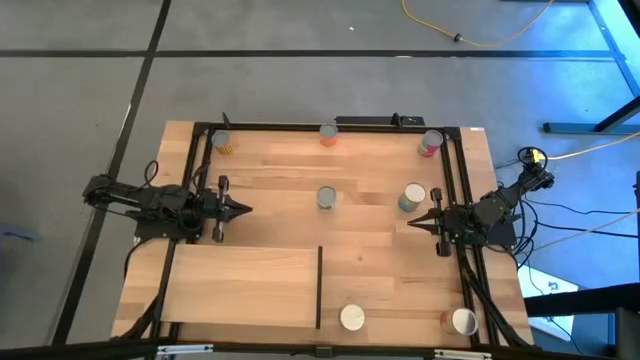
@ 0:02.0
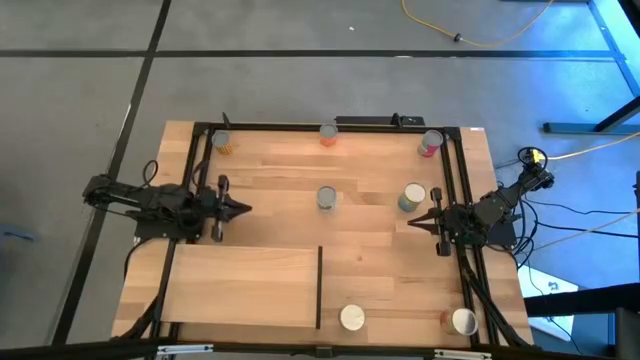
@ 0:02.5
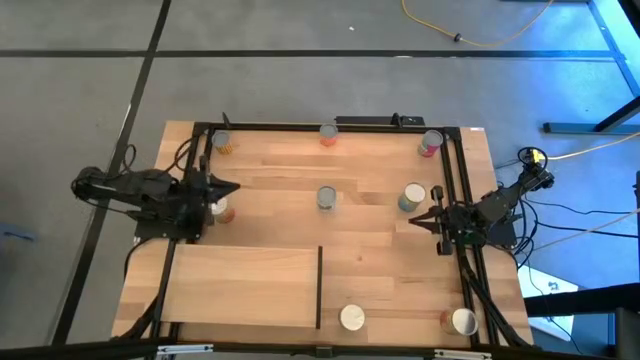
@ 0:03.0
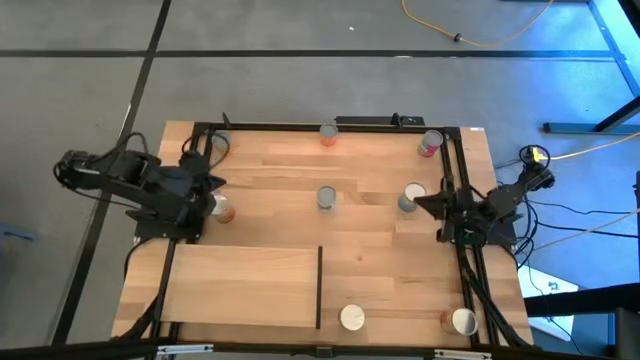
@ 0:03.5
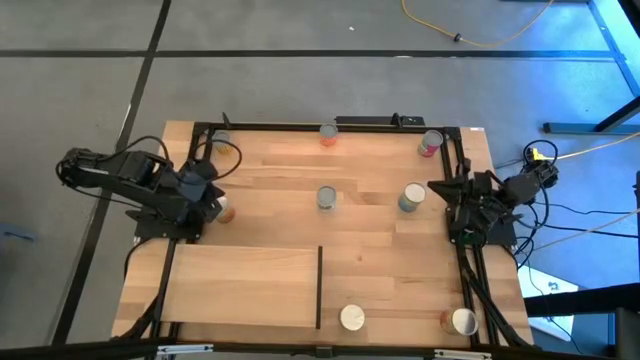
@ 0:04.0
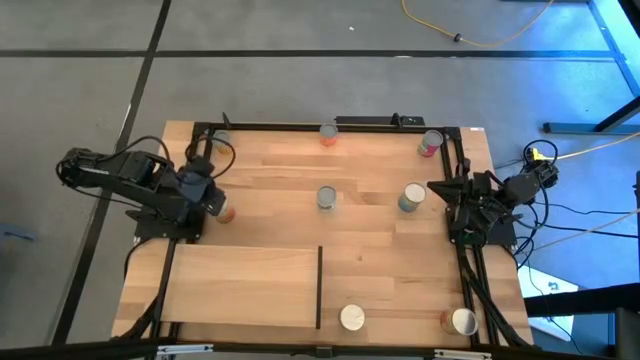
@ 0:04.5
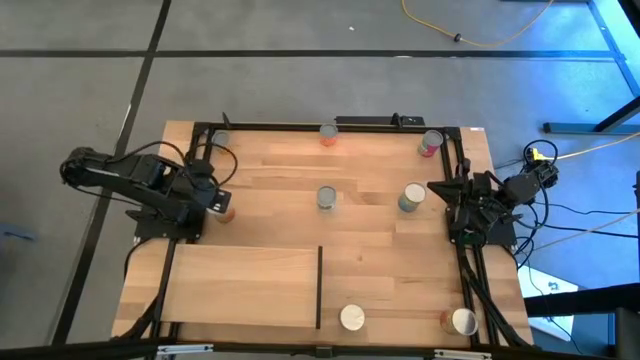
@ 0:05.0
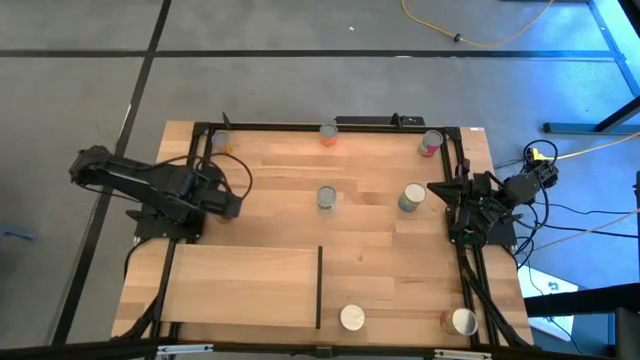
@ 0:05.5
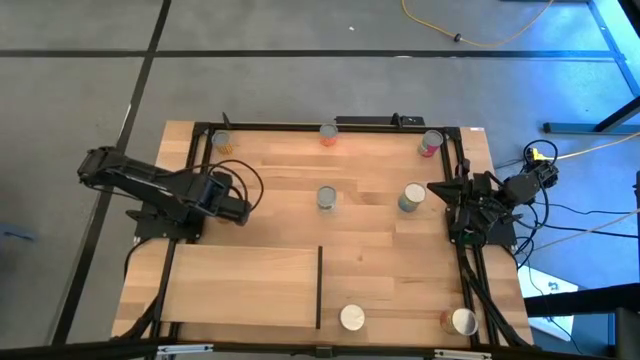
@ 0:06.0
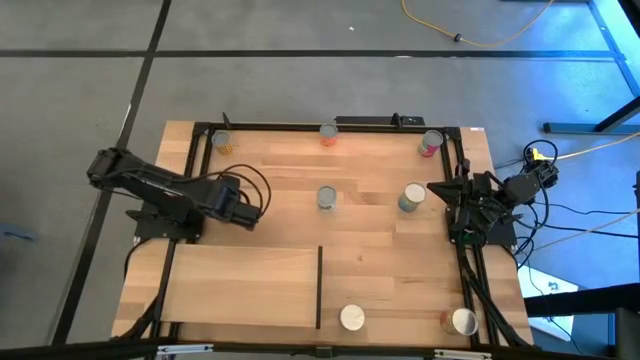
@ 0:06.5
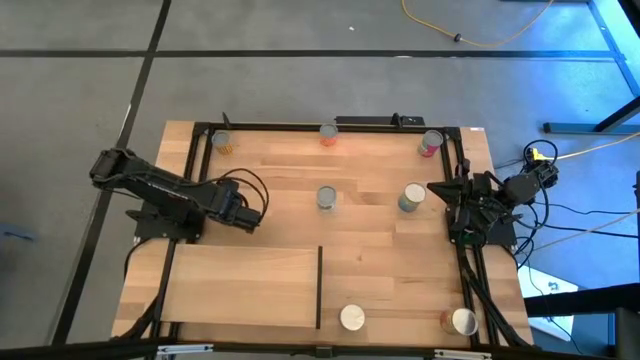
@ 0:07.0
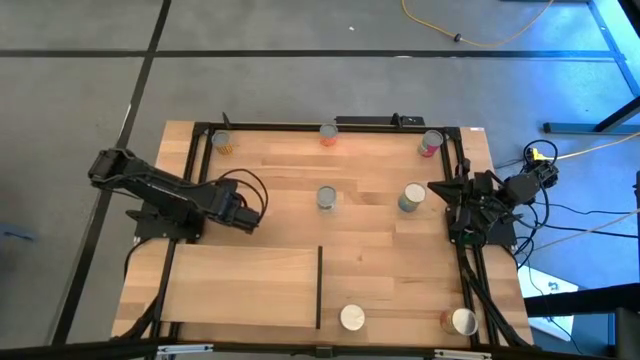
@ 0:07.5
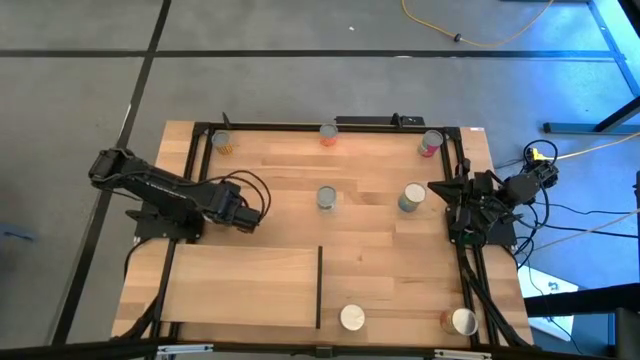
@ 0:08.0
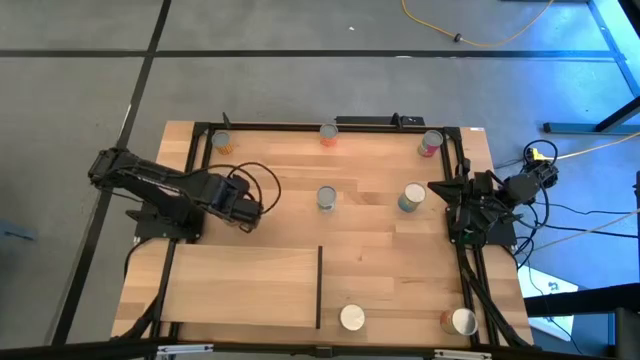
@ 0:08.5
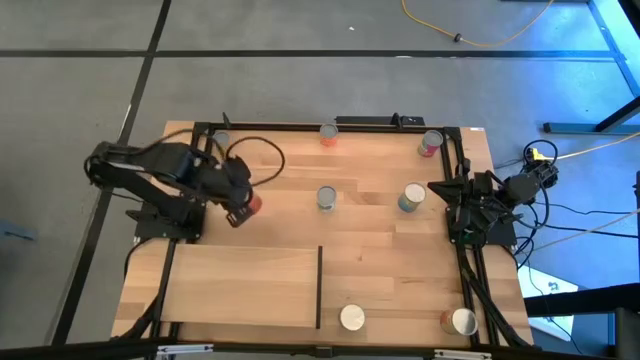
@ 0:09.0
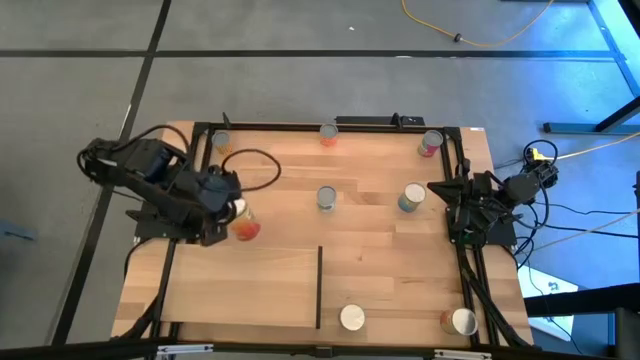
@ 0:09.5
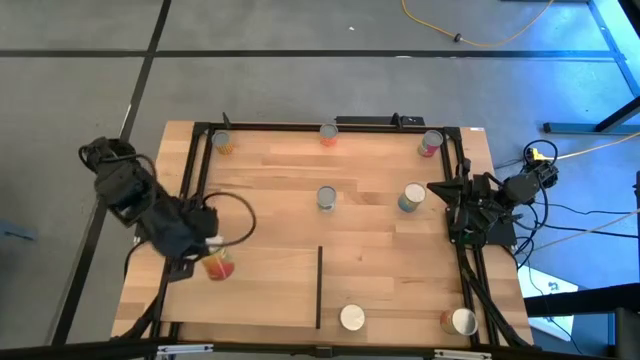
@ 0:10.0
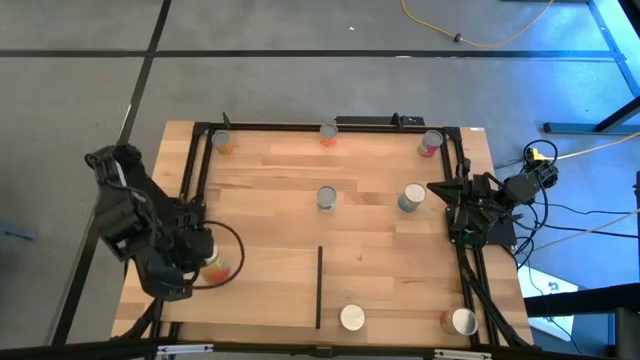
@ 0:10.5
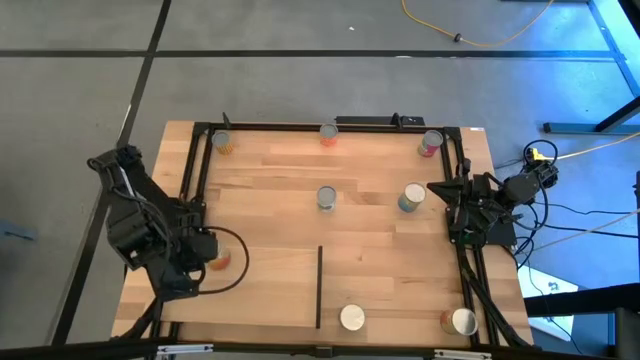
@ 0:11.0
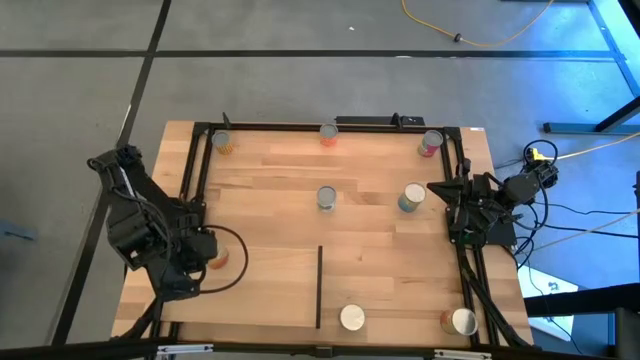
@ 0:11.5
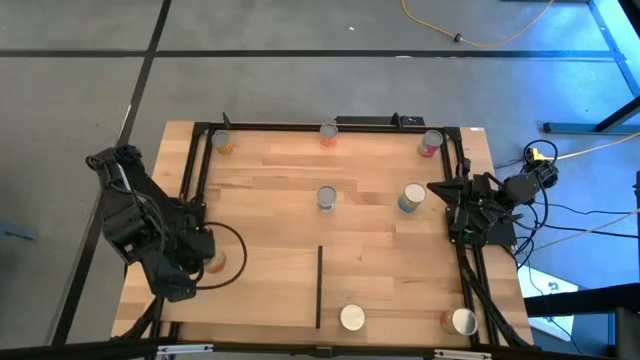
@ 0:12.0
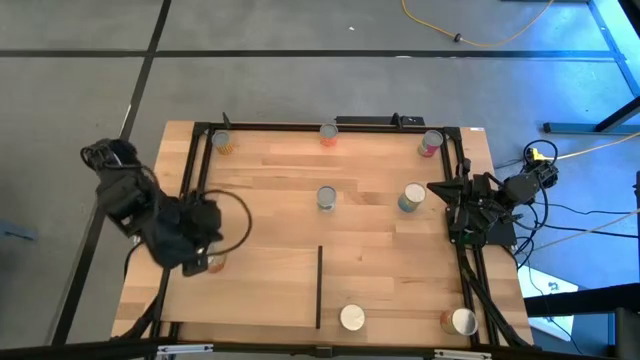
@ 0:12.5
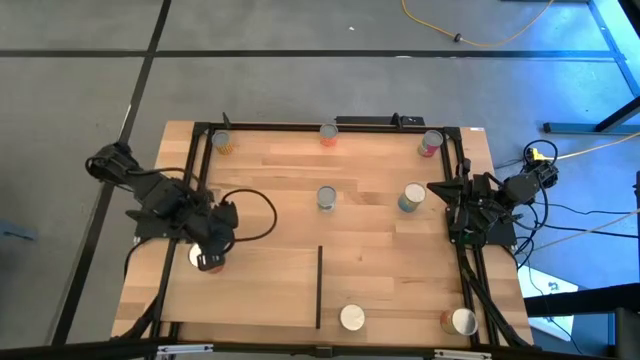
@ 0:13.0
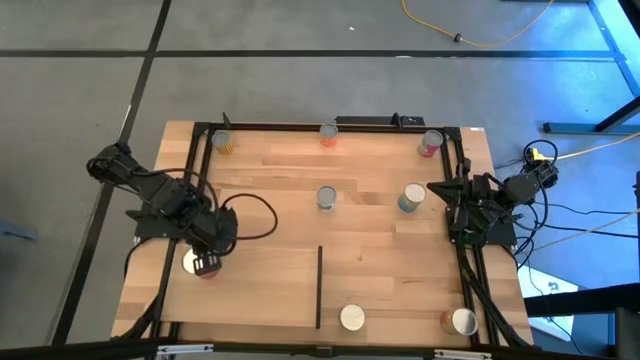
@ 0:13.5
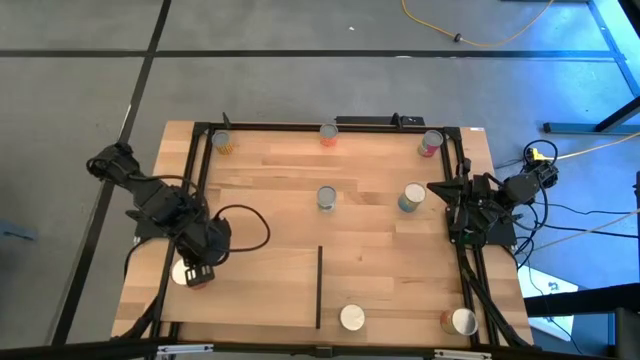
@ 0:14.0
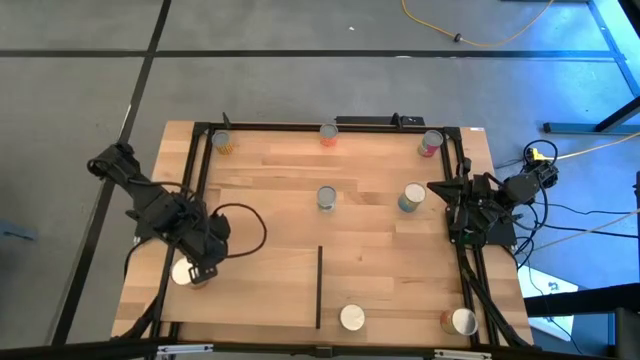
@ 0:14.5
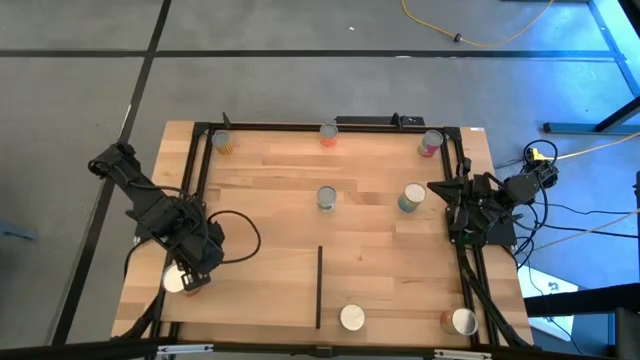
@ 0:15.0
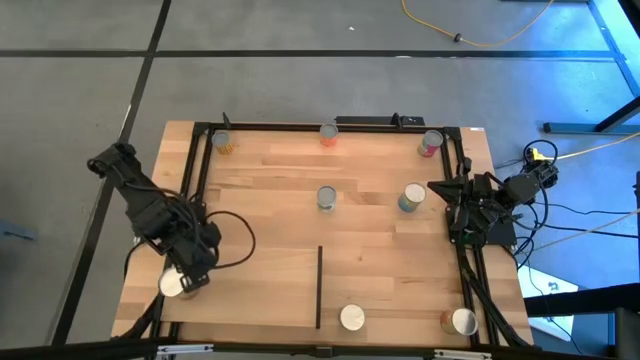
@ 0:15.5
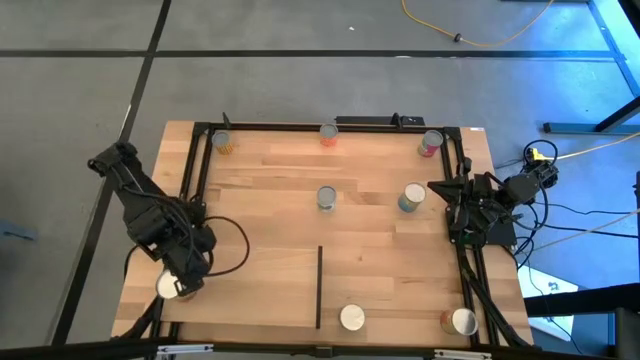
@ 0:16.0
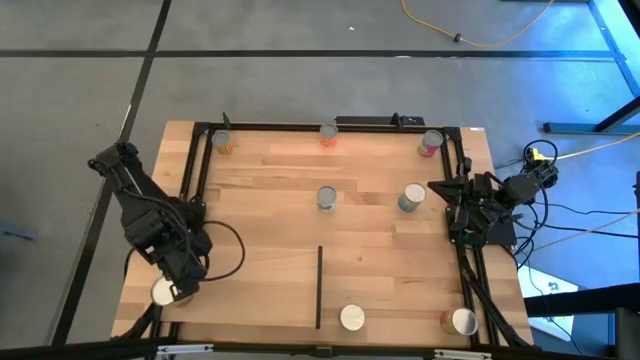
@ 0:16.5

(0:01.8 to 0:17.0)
Task: Pick and place cans onto a shelf
Put the canned green beans on the shelf
